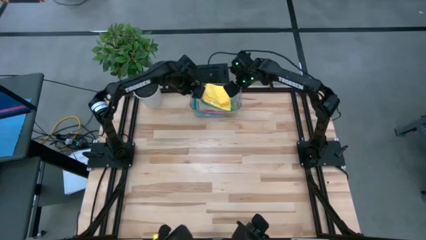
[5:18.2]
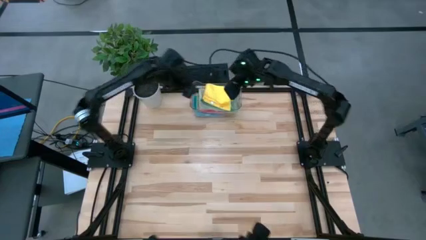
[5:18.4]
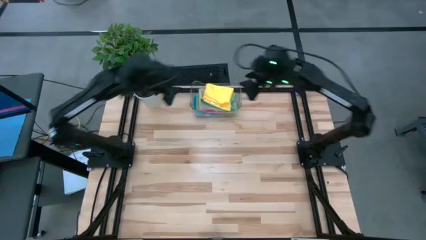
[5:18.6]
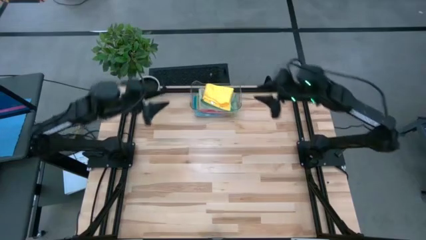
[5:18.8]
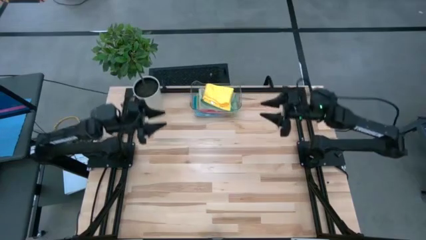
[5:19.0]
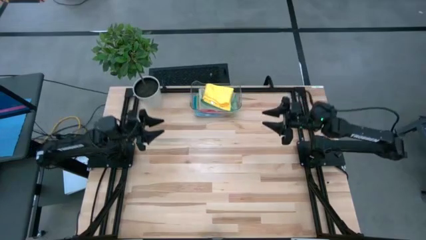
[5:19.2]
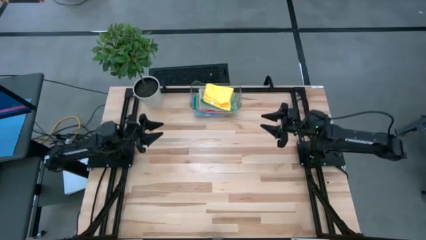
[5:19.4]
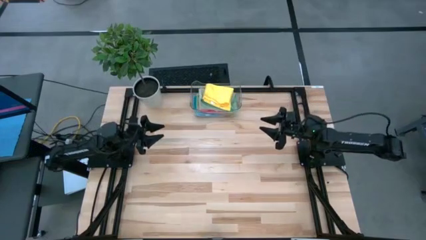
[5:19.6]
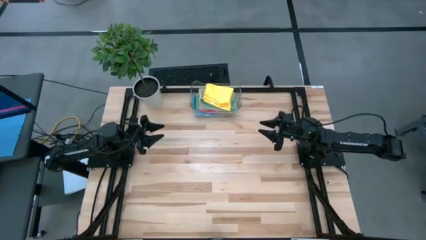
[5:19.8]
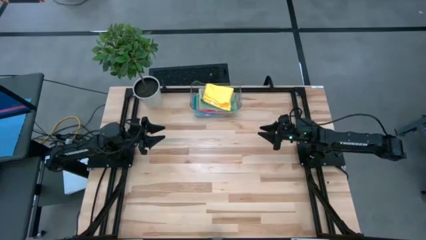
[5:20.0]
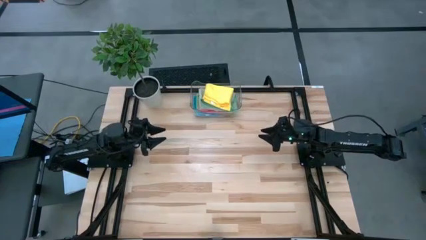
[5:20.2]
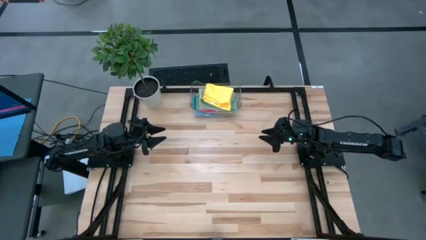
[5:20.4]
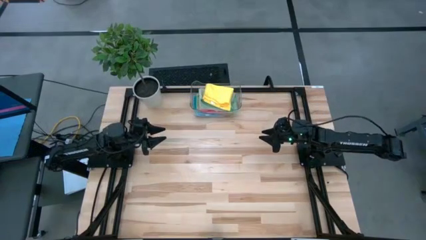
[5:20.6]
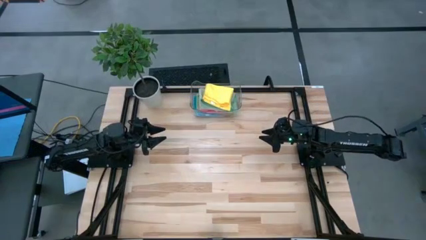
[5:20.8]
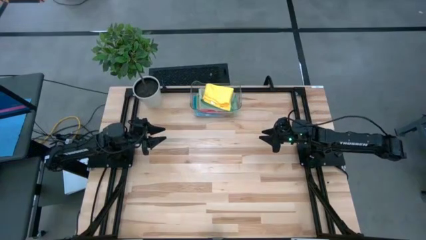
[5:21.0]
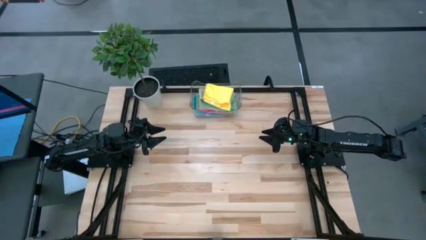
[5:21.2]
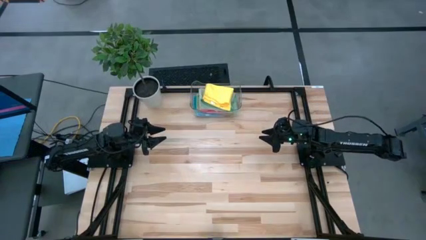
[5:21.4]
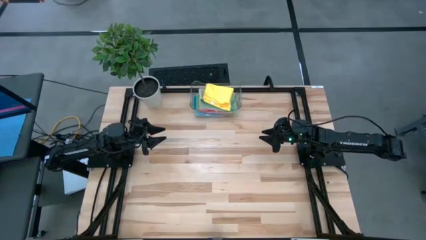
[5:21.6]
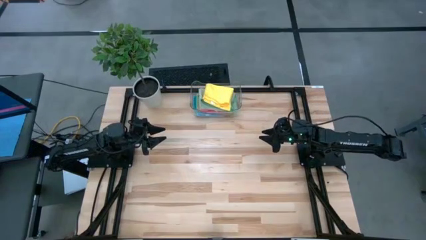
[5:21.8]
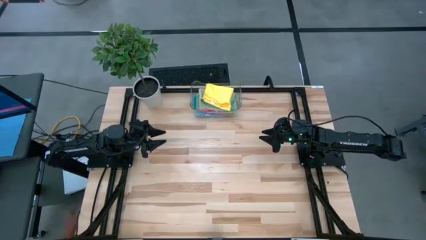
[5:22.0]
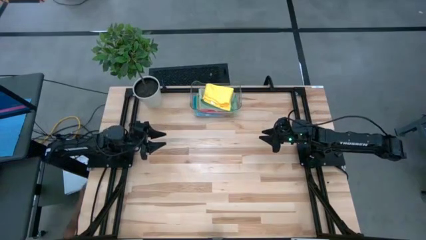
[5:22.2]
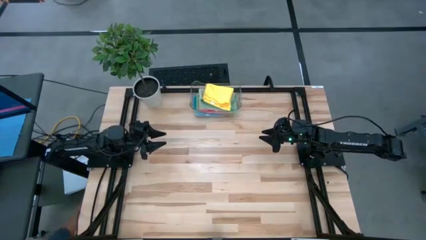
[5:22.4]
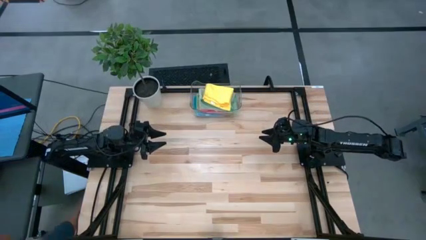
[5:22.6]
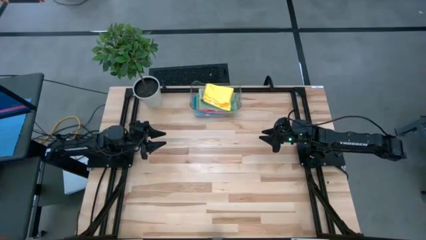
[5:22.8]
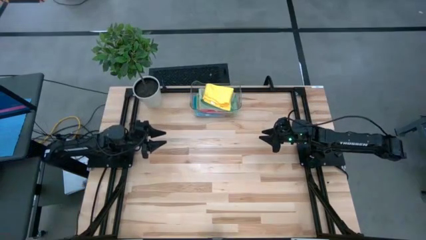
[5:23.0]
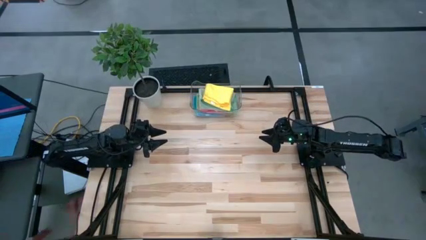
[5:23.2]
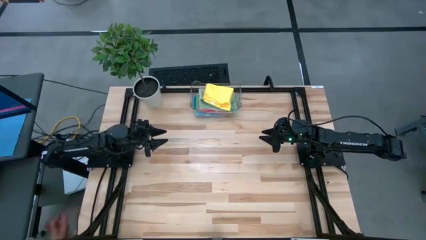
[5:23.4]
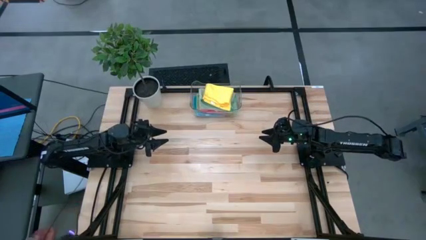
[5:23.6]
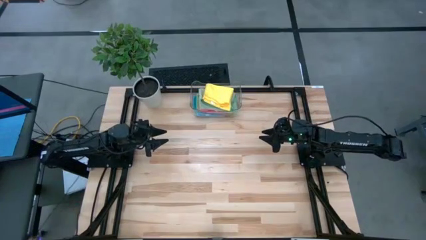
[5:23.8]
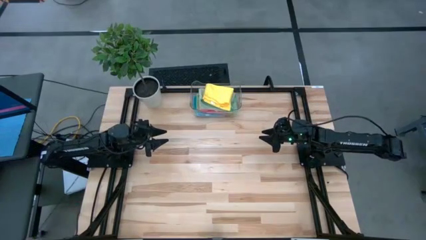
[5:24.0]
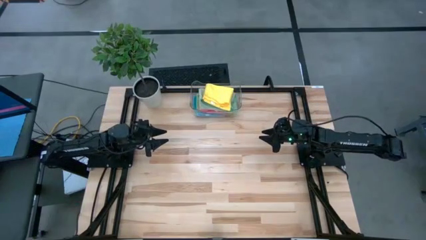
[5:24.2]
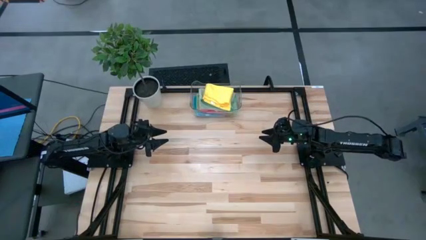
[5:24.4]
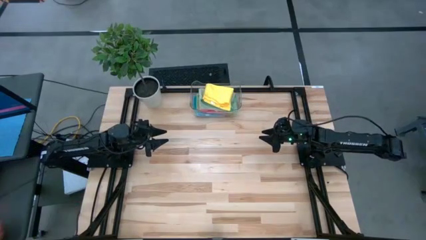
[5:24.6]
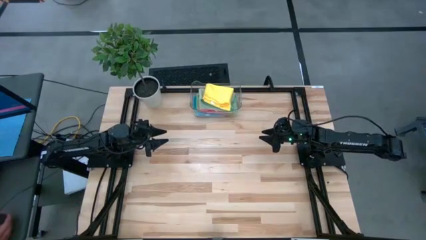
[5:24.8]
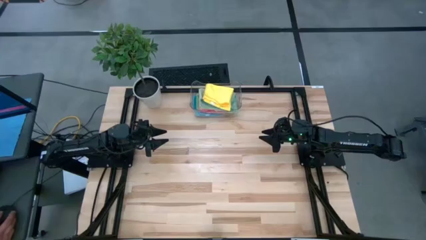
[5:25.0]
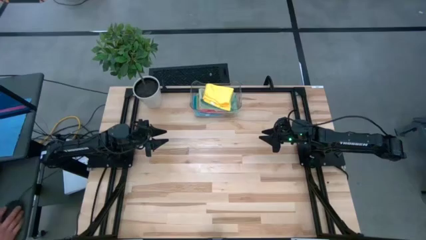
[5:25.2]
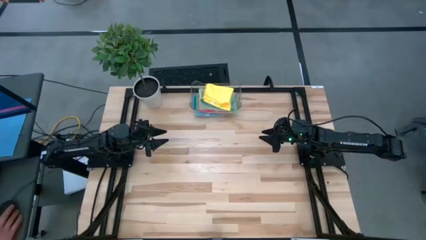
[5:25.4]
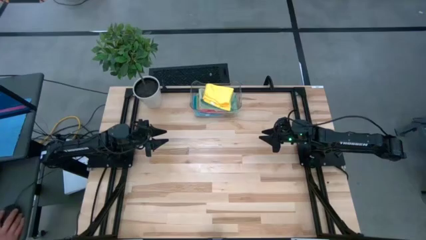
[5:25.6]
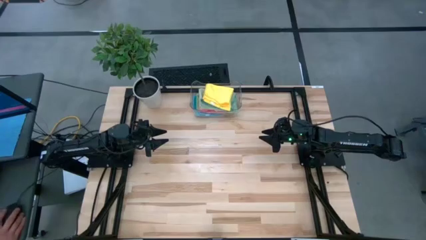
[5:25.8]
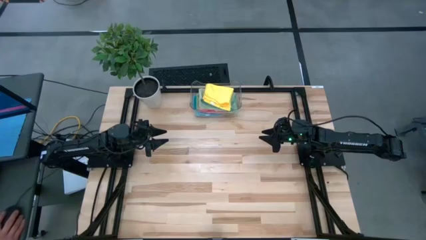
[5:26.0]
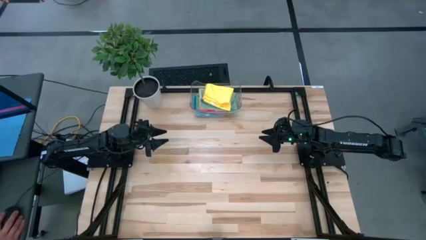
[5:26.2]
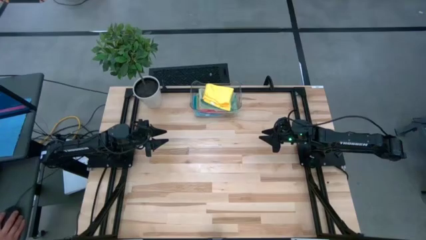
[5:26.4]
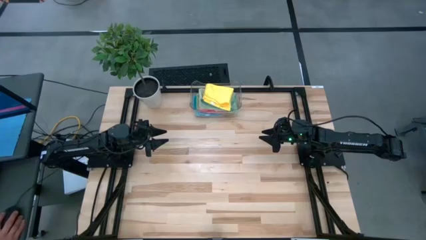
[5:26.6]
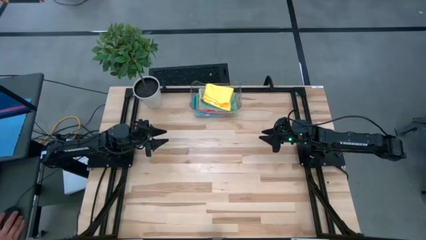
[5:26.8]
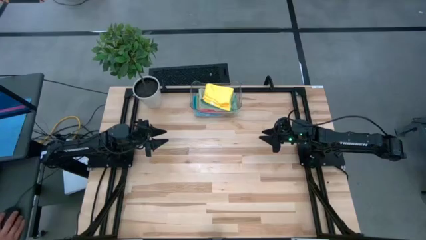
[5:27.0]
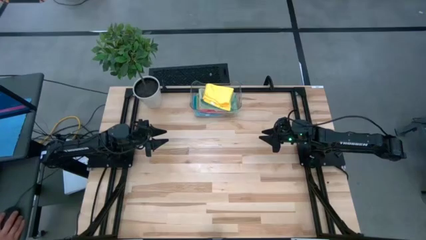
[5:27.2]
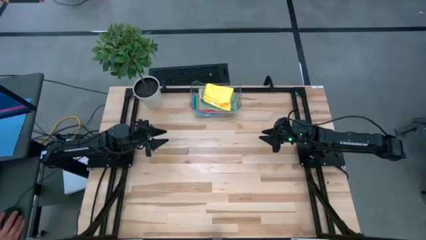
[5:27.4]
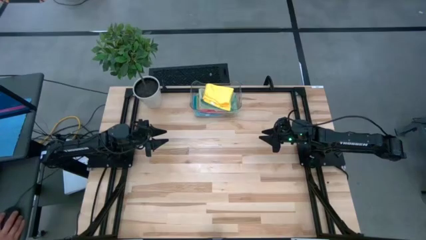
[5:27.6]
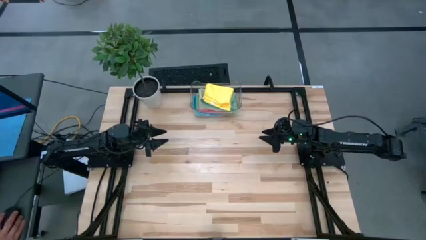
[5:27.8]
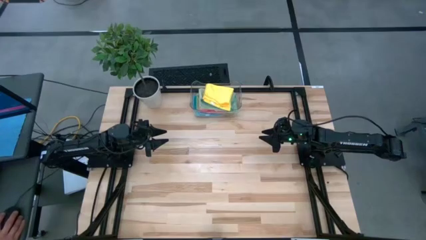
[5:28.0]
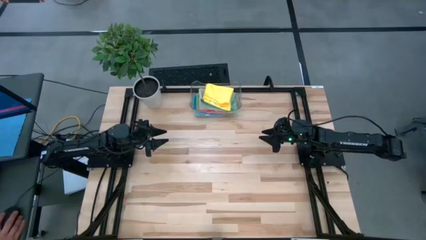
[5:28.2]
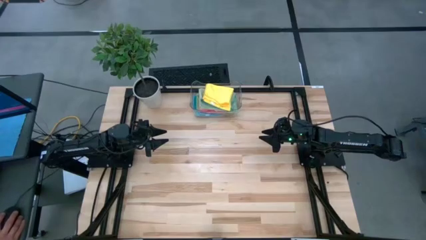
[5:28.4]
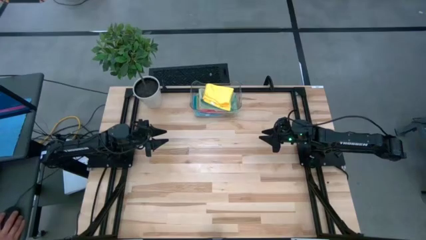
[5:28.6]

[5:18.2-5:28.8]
Task: Fold microfiber towels
Return to Home Position

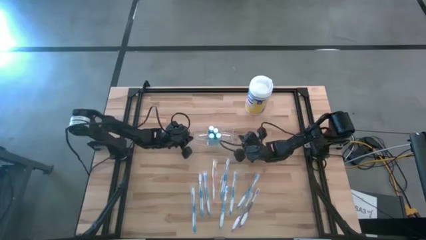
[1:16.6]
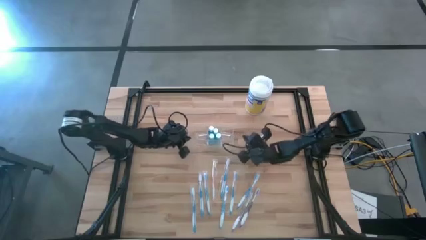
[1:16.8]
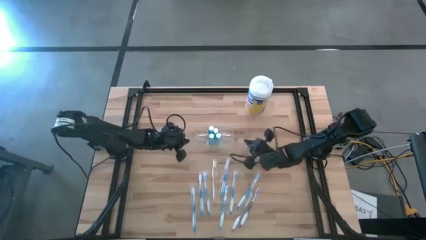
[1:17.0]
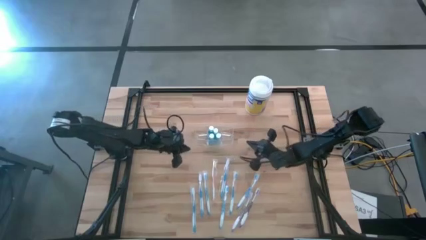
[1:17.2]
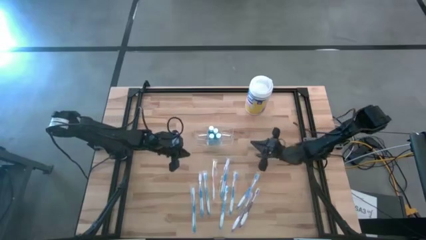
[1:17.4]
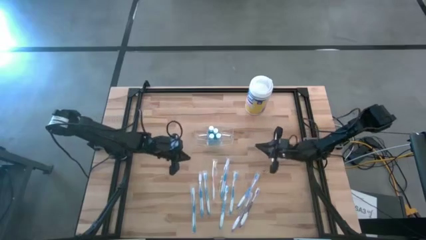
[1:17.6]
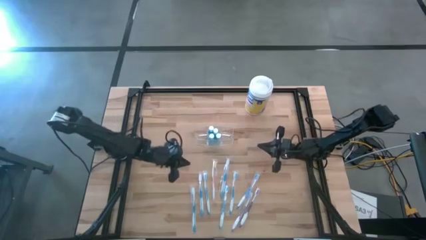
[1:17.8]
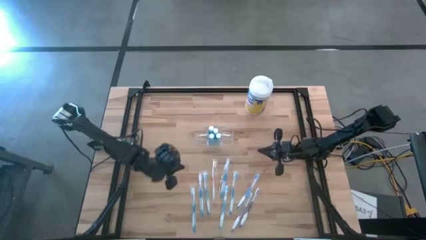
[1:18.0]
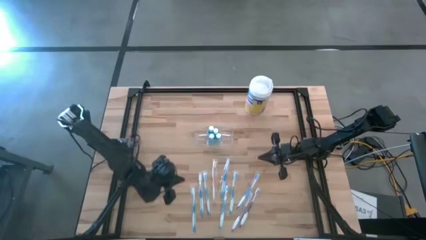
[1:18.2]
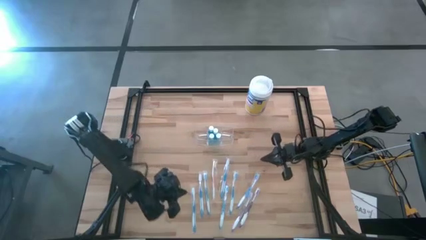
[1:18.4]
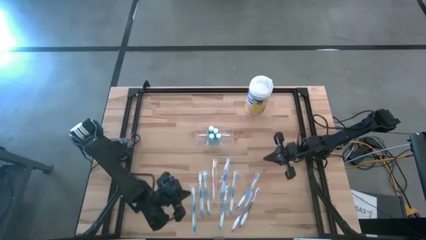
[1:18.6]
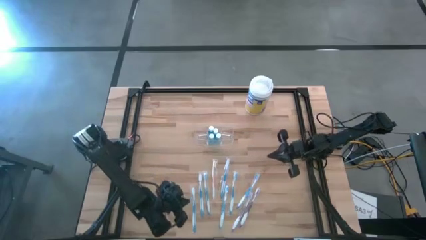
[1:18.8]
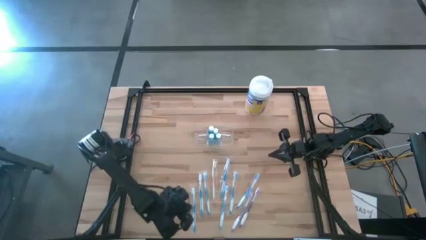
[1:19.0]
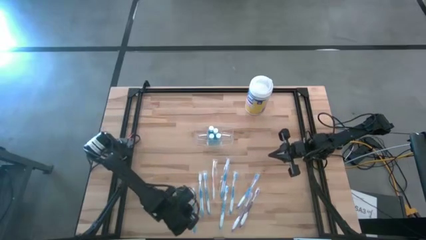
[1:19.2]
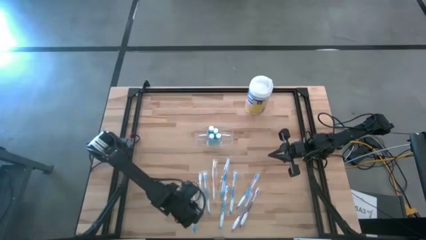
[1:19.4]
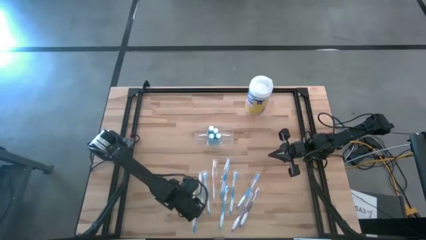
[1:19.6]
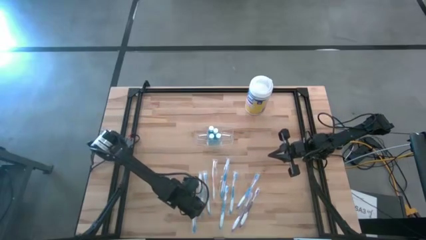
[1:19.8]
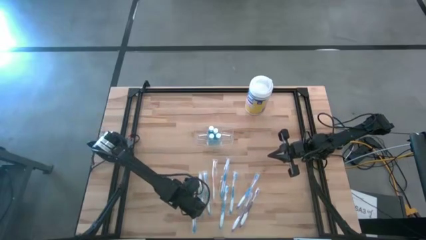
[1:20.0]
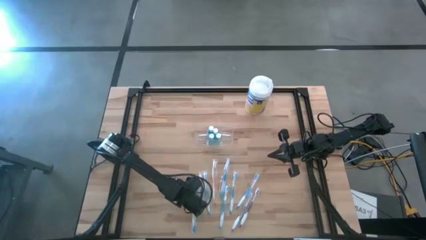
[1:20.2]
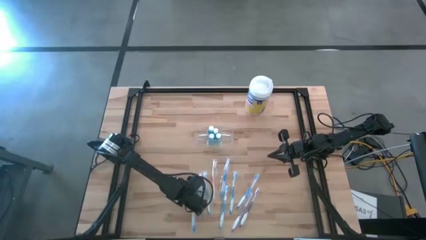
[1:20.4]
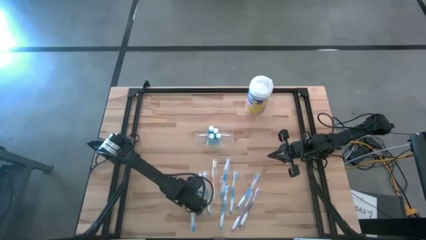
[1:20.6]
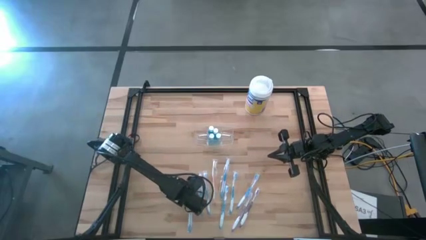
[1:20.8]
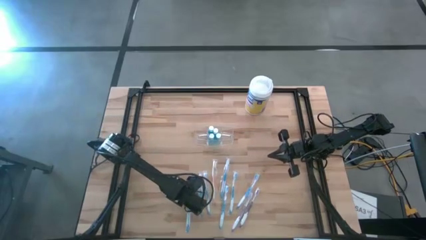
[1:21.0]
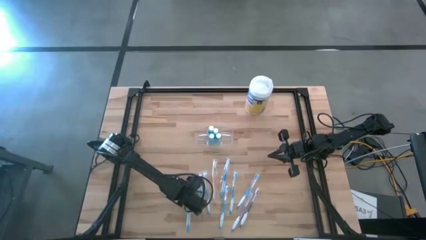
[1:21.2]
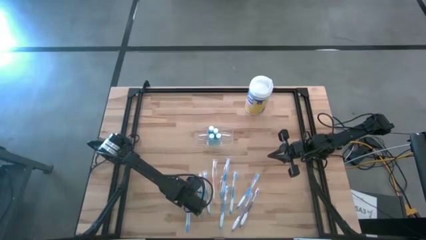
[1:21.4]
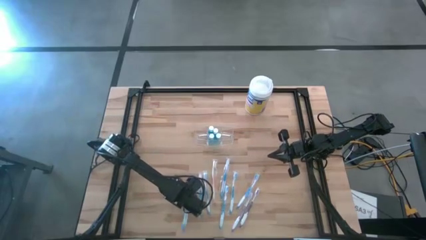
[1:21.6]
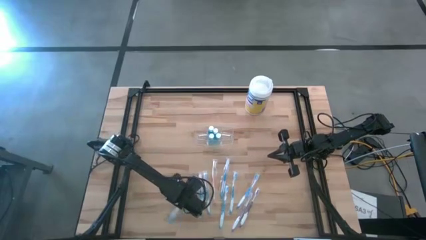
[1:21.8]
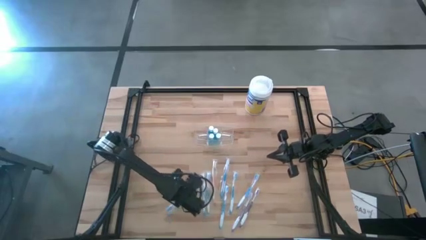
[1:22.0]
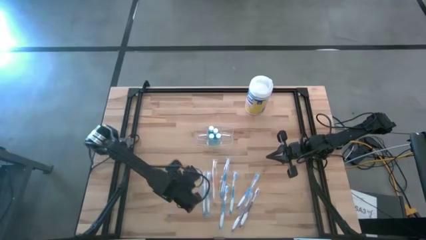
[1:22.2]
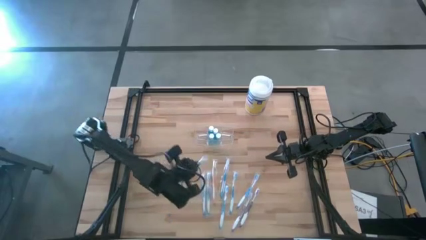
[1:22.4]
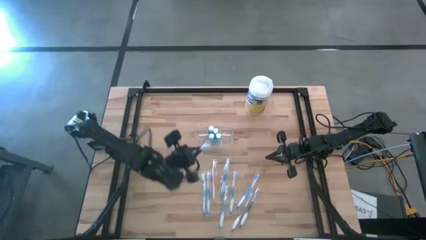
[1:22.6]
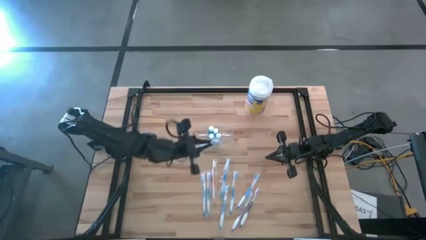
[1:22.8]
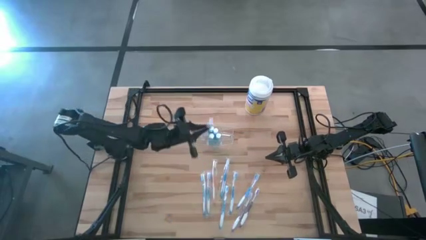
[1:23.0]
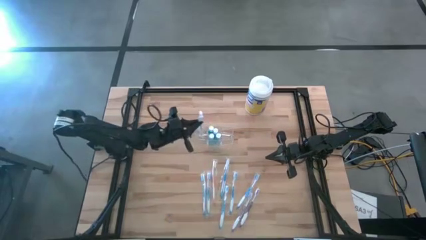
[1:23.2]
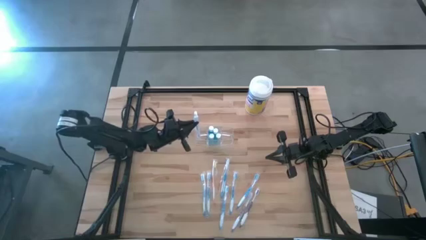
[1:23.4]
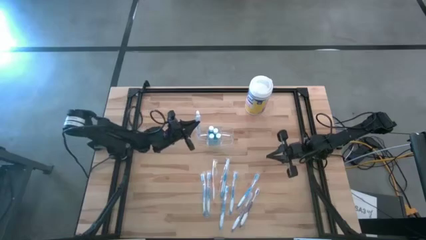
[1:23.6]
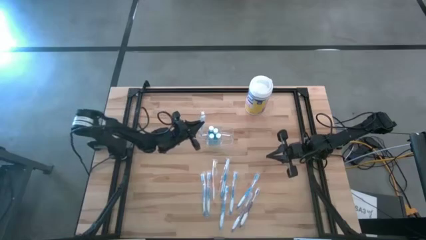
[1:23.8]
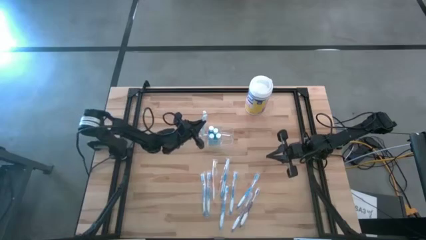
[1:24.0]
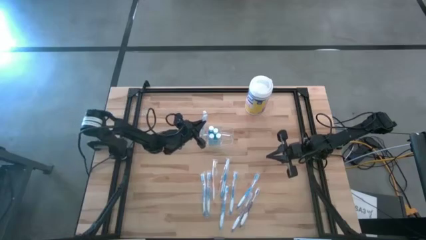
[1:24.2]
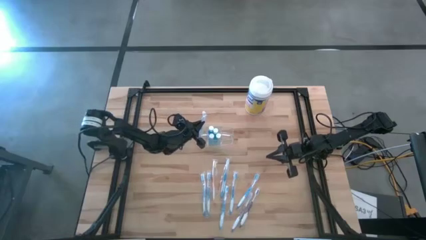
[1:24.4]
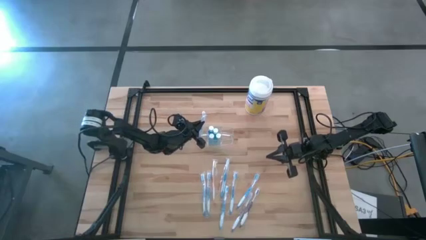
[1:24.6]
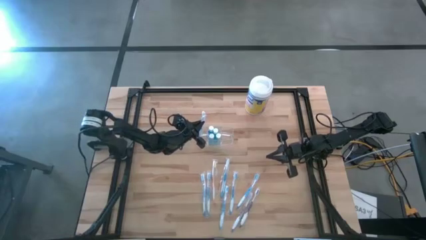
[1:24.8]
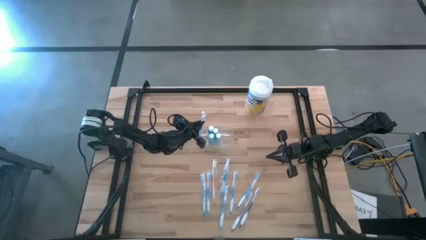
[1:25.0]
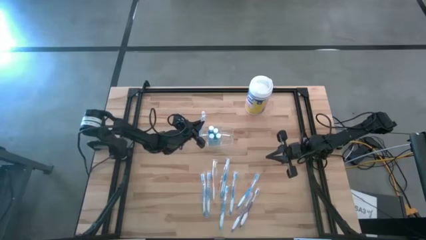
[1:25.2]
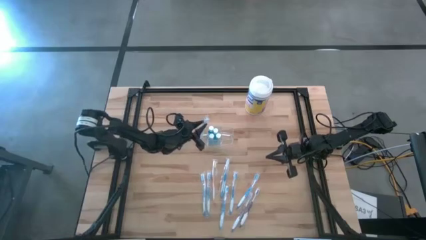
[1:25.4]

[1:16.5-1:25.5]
Task: Pick & Place toothbrushing station
Put the blue toothbrush into the transparent organizer
